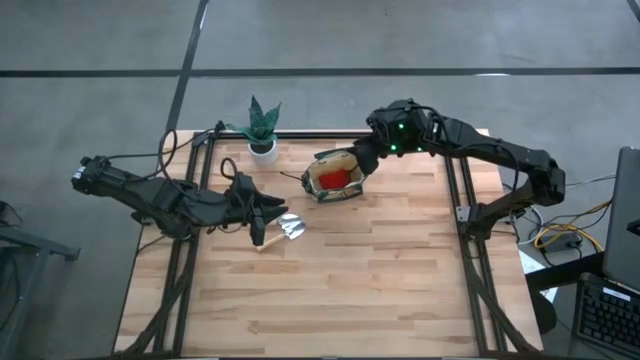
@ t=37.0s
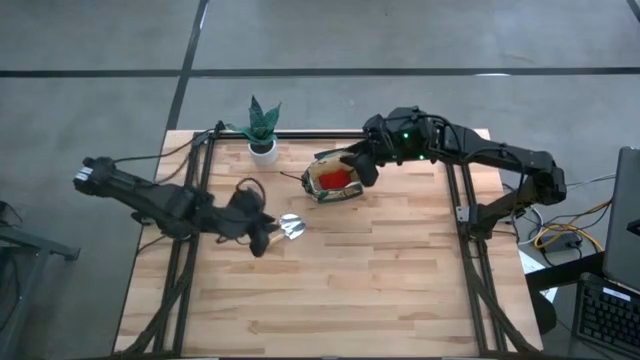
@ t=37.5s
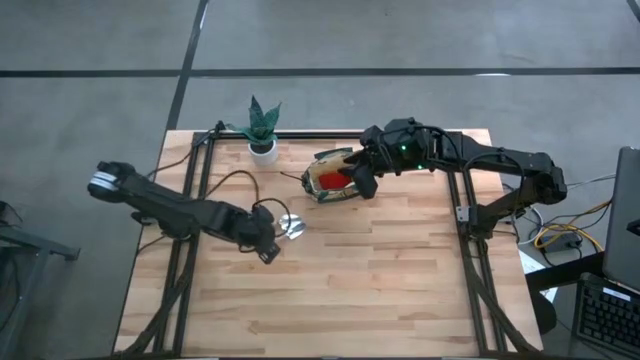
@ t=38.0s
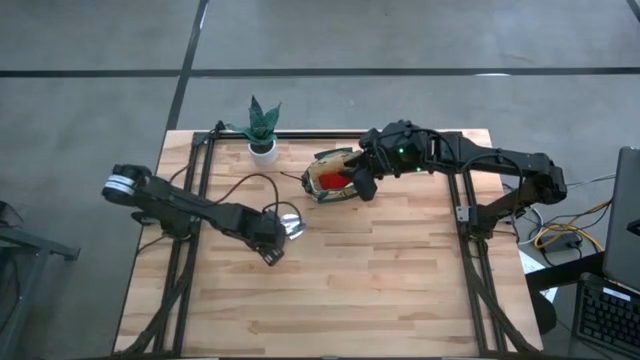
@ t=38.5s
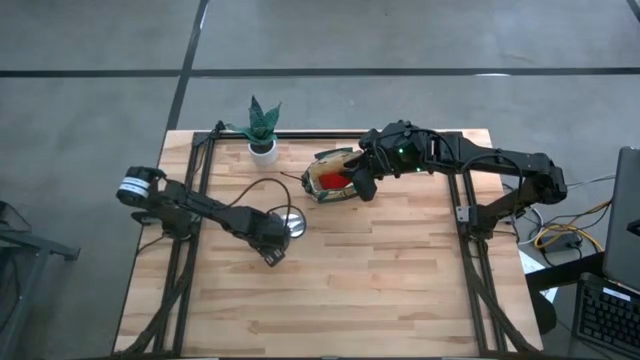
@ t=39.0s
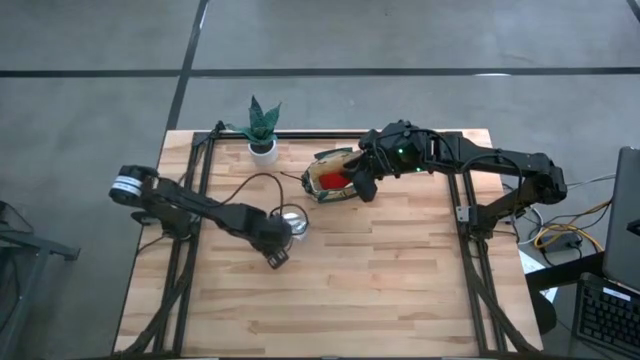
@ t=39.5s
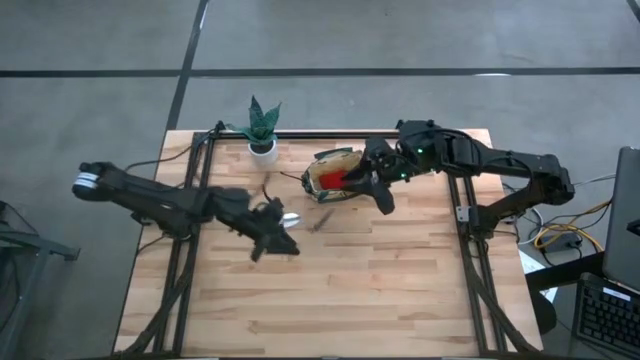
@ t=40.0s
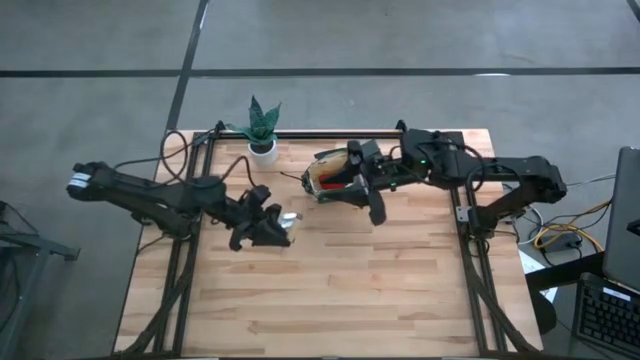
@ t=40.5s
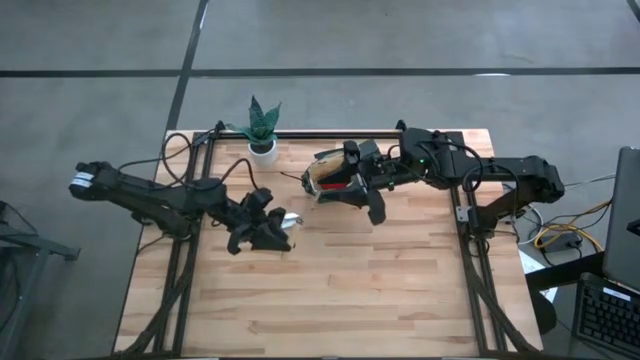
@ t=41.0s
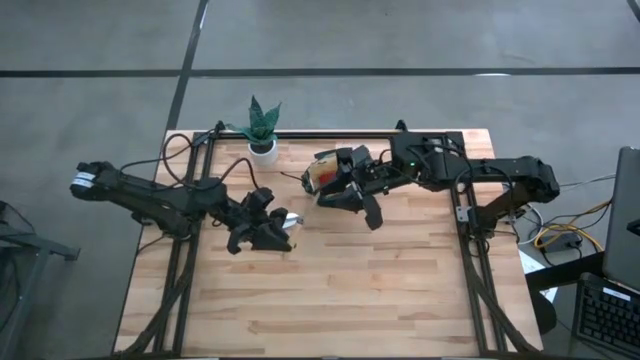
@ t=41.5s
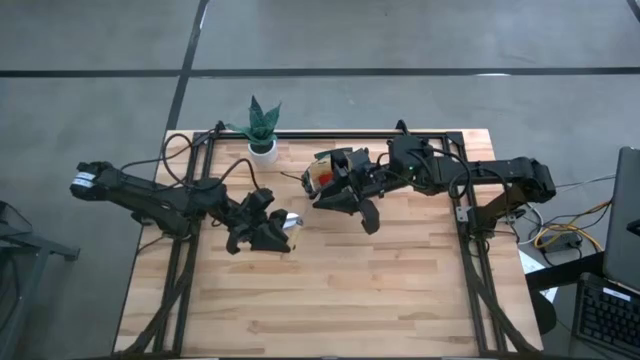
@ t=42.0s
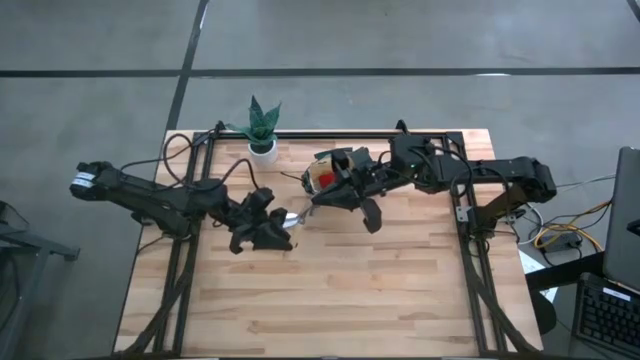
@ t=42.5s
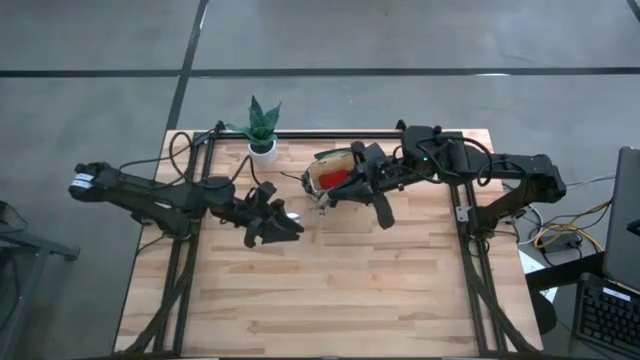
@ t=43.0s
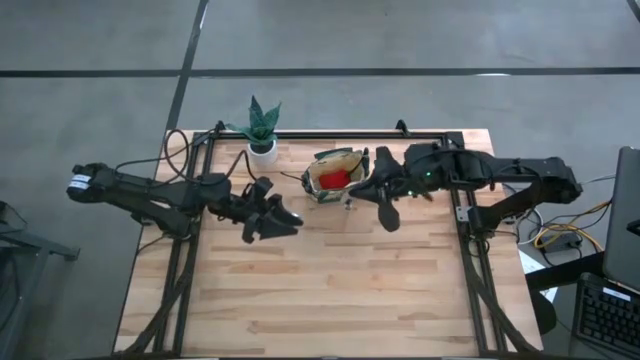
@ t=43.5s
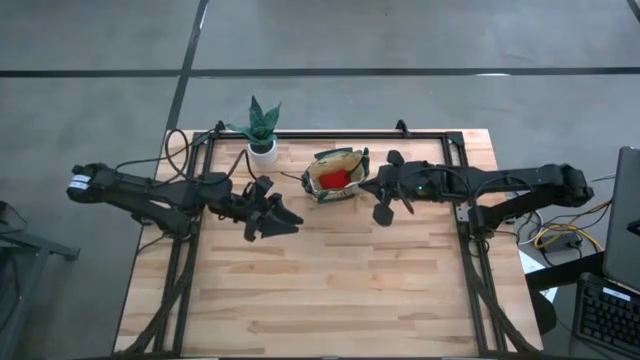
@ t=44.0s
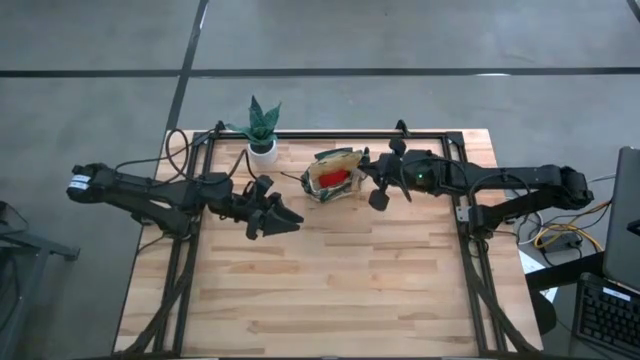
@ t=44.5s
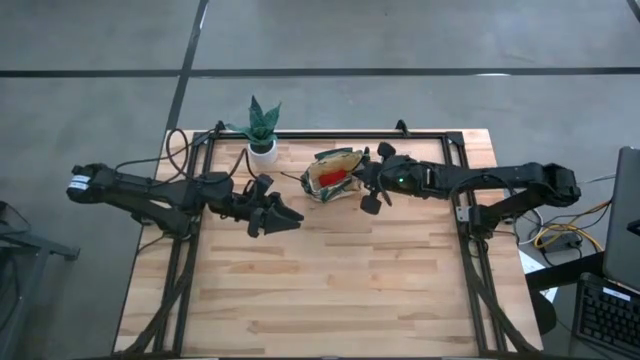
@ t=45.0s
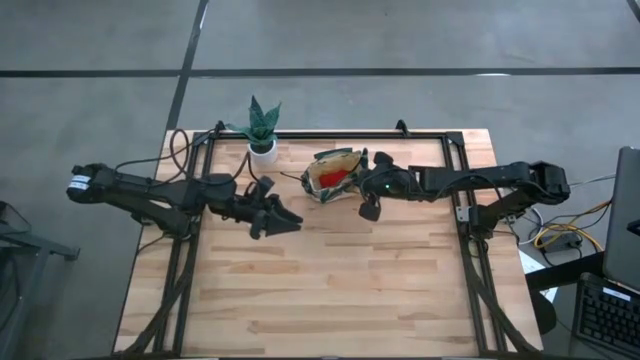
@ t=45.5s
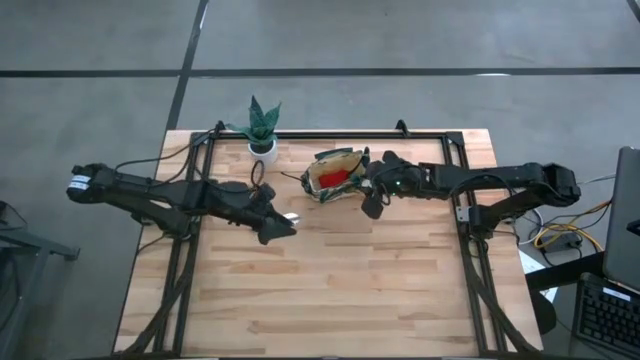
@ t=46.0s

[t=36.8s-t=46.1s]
Task: Pick & Place Garden tools in Gardening bag
Put the brown trowel into the white bag

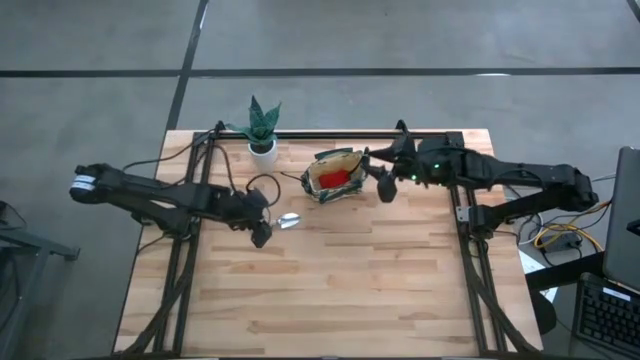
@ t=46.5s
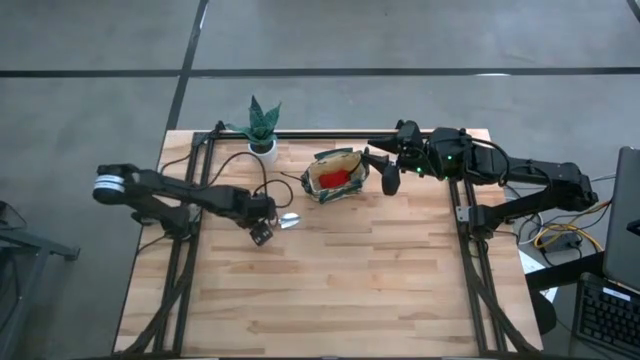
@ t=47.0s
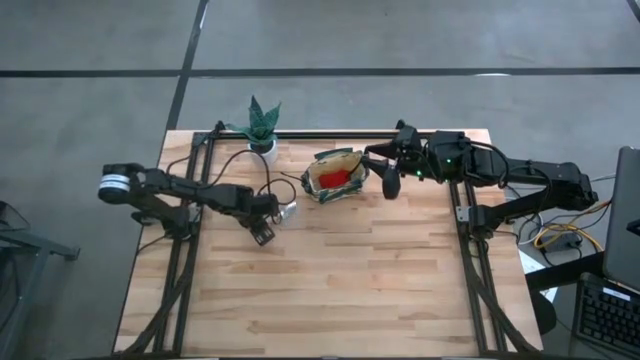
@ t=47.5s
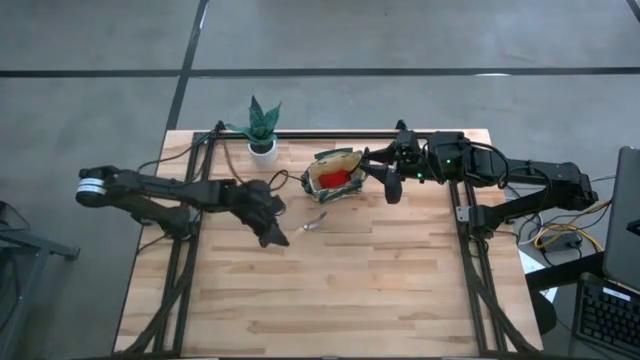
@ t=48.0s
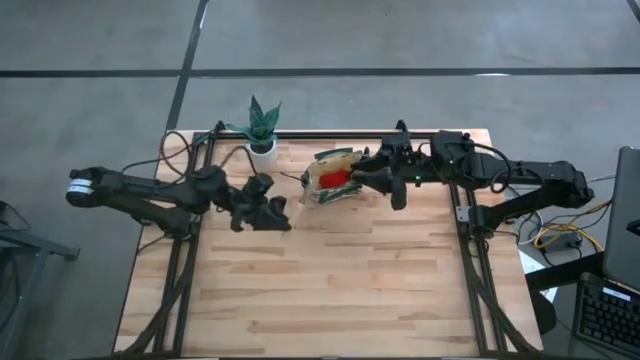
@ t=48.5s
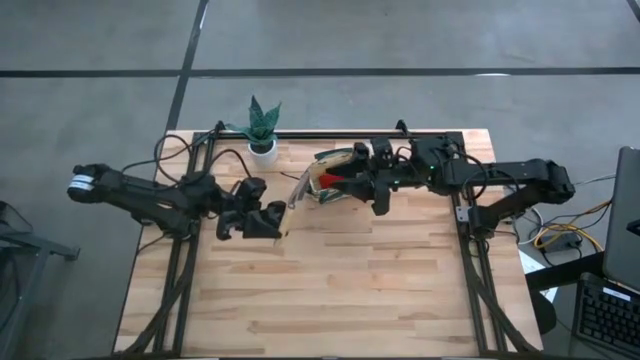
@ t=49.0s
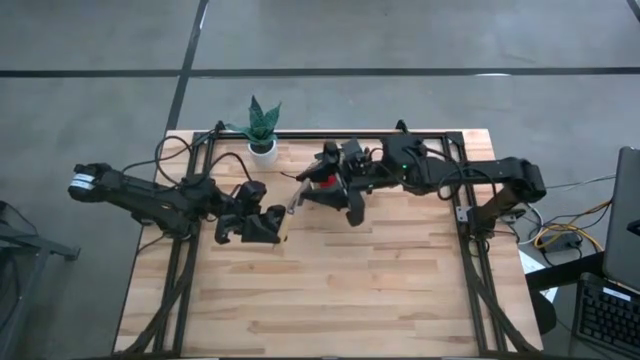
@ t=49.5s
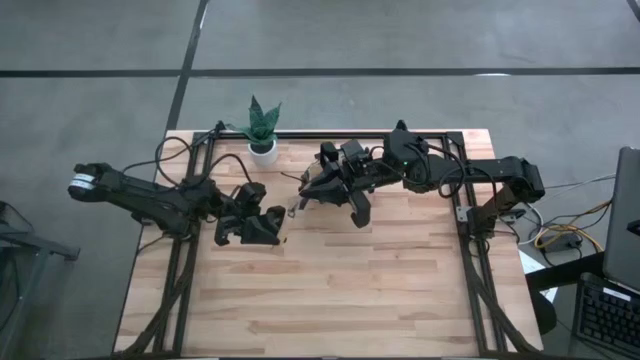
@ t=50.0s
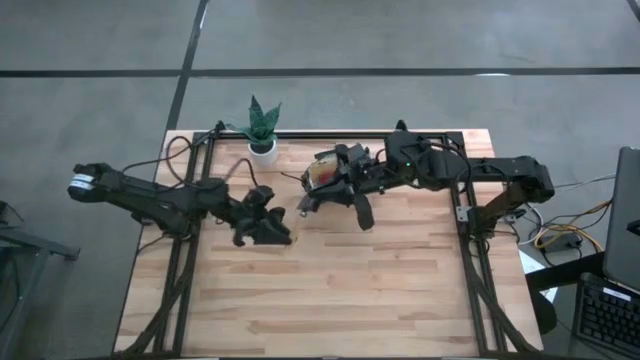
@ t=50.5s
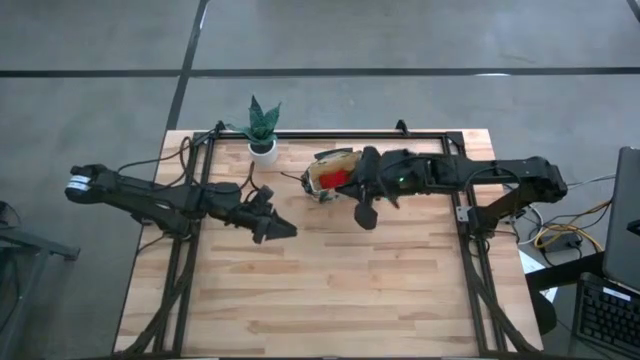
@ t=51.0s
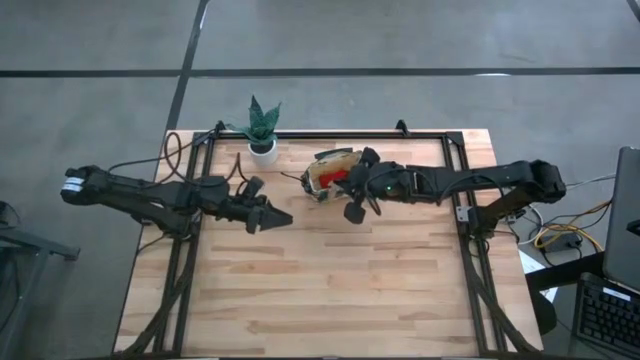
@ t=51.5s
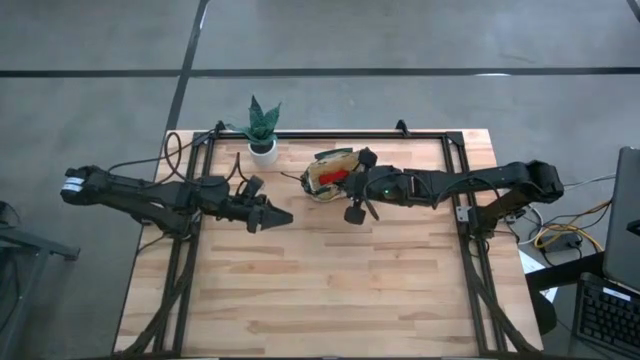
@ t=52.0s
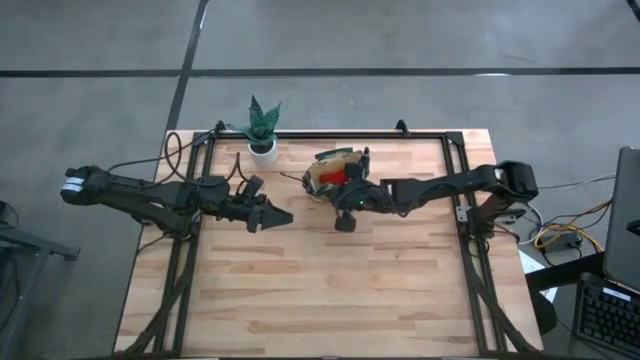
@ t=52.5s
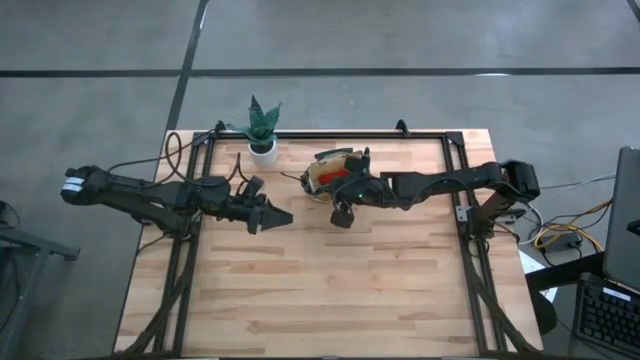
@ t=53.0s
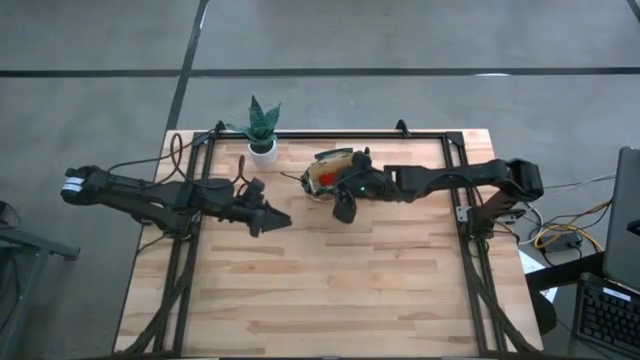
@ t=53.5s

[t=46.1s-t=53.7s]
Put the brown trowel into the white bag

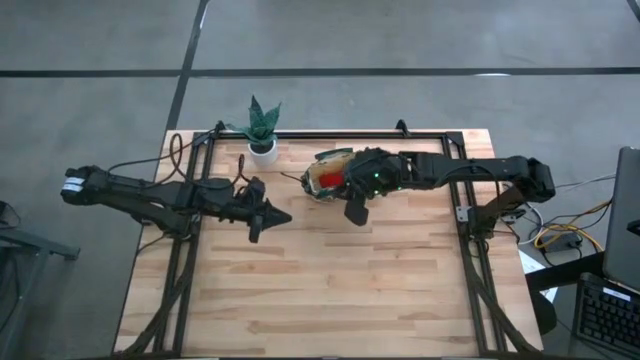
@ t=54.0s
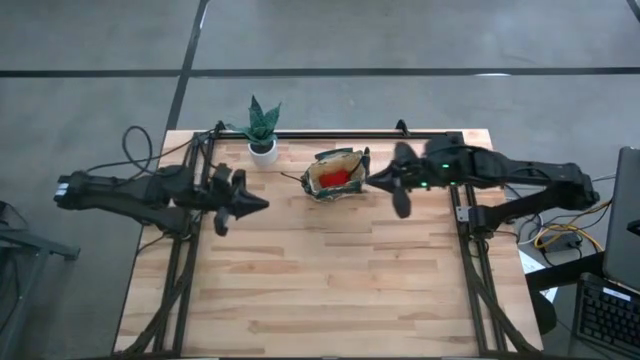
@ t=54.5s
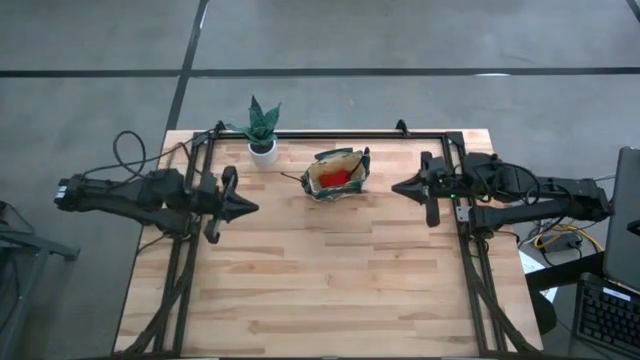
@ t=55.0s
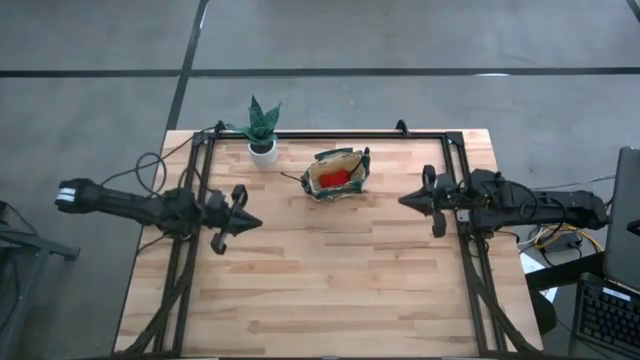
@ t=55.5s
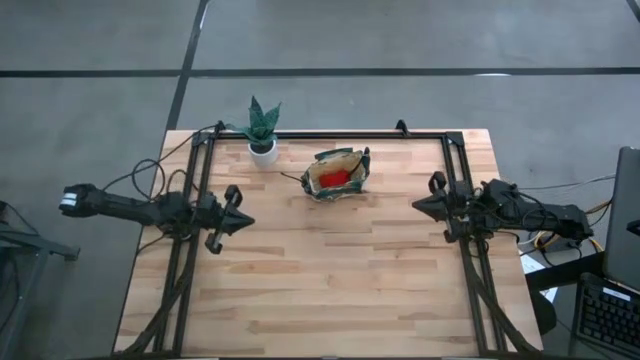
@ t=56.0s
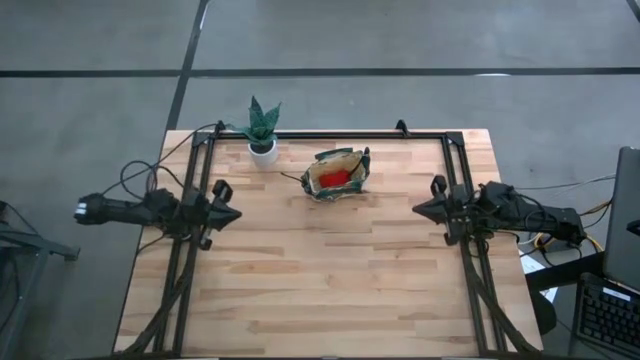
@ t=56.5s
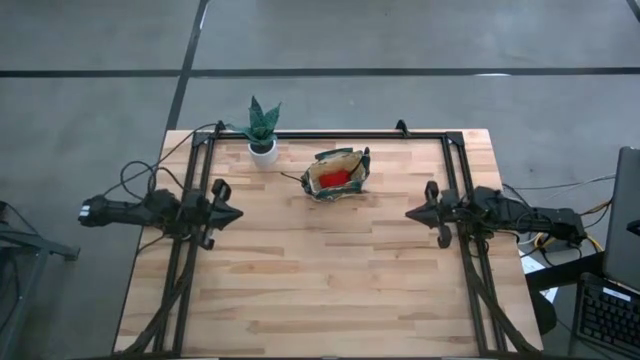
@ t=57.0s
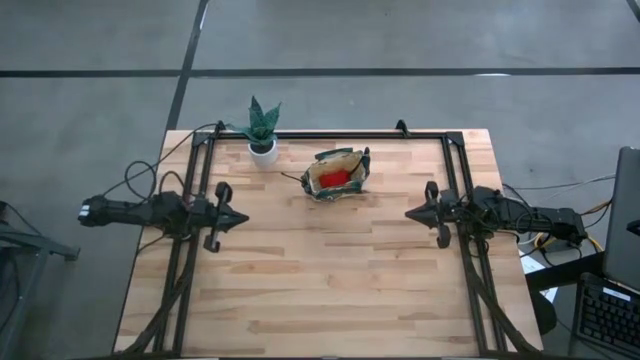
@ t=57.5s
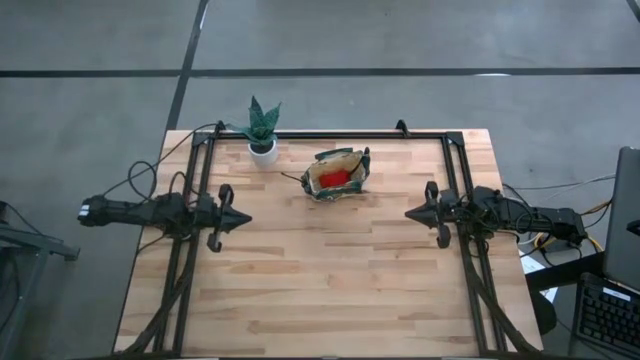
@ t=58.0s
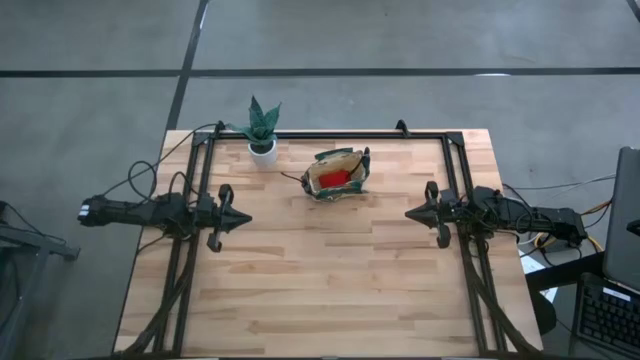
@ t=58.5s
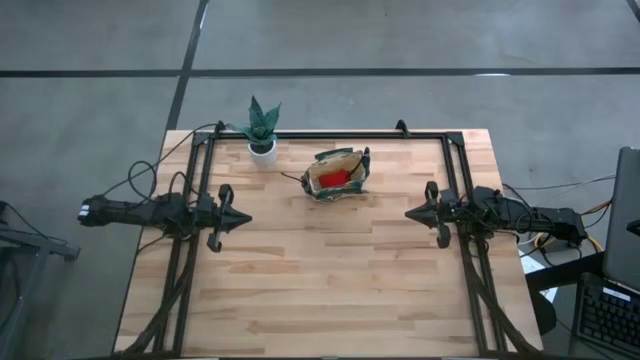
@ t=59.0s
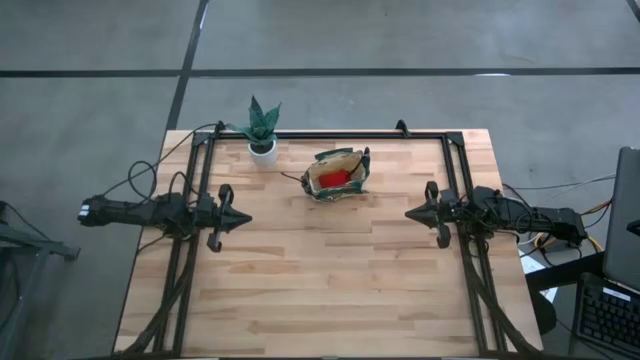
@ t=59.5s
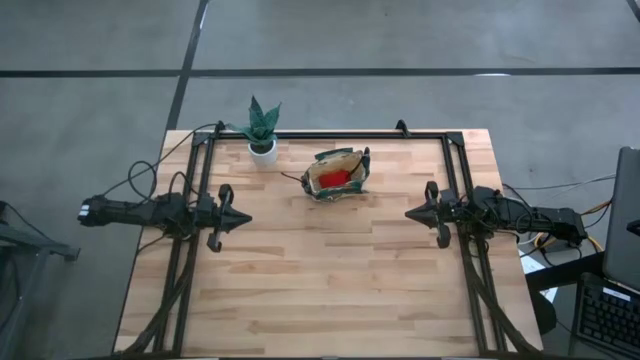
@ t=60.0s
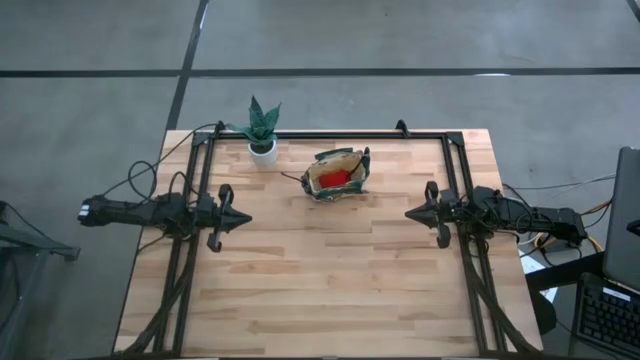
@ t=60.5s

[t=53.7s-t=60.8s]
Return to Home Position
